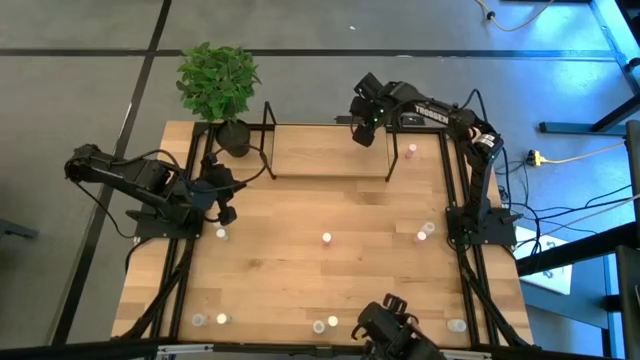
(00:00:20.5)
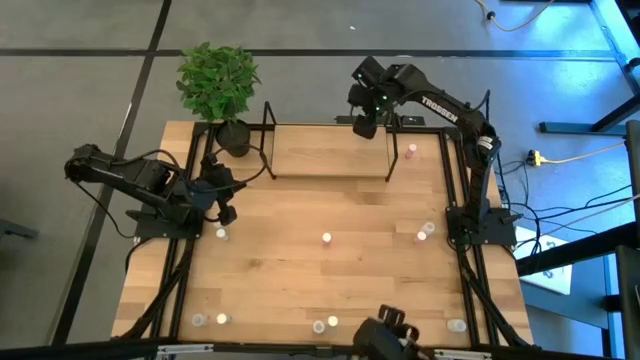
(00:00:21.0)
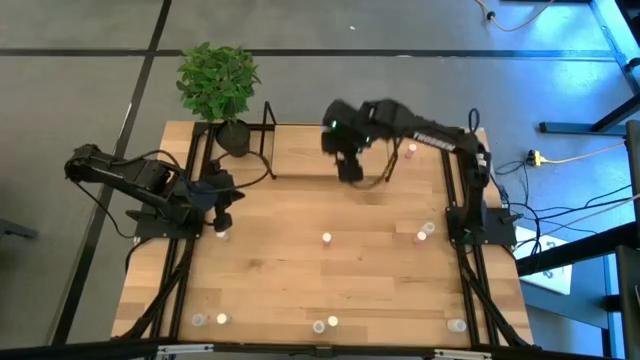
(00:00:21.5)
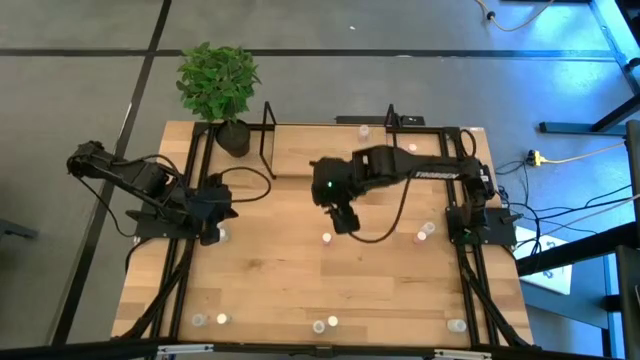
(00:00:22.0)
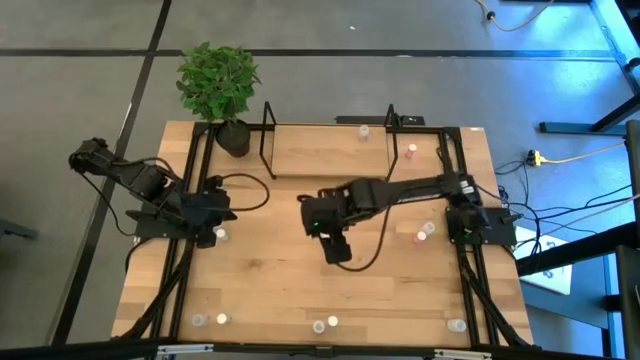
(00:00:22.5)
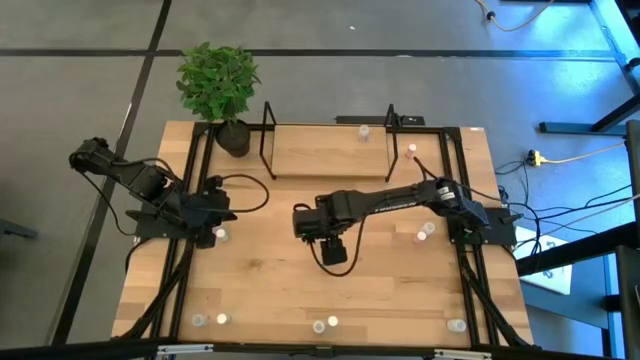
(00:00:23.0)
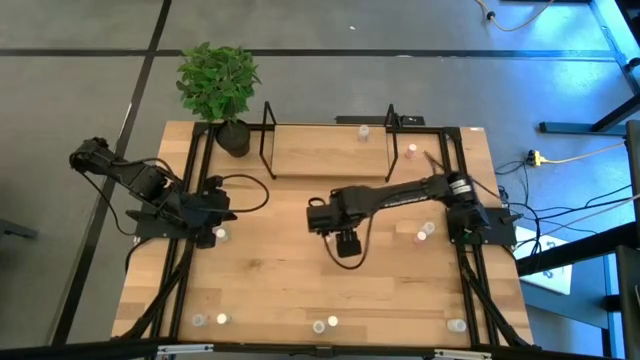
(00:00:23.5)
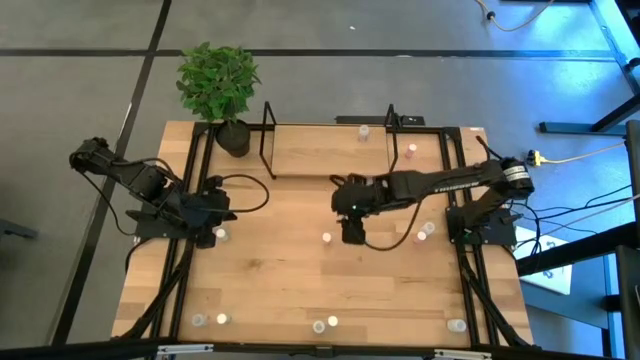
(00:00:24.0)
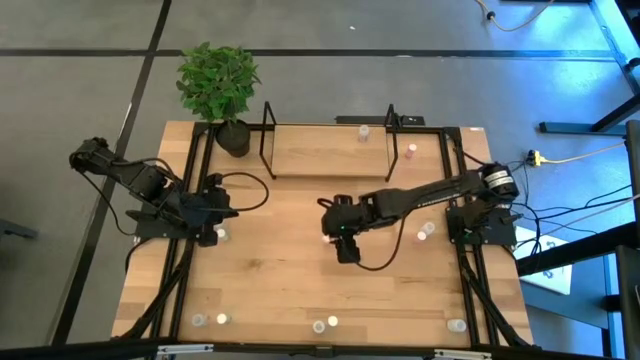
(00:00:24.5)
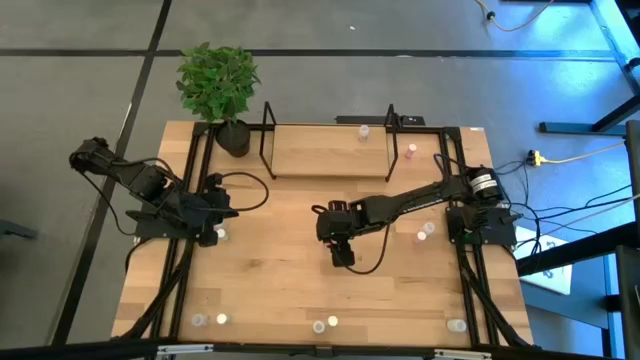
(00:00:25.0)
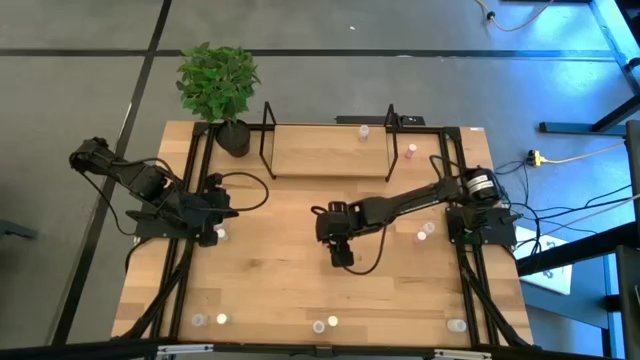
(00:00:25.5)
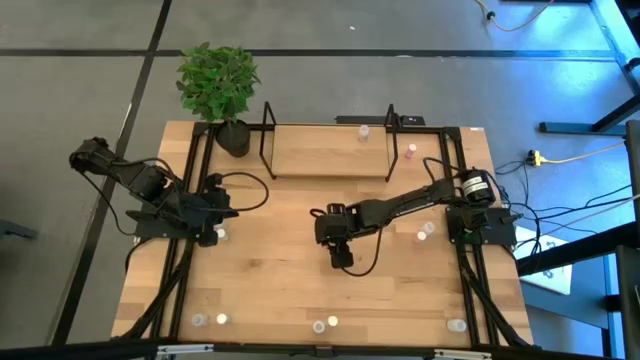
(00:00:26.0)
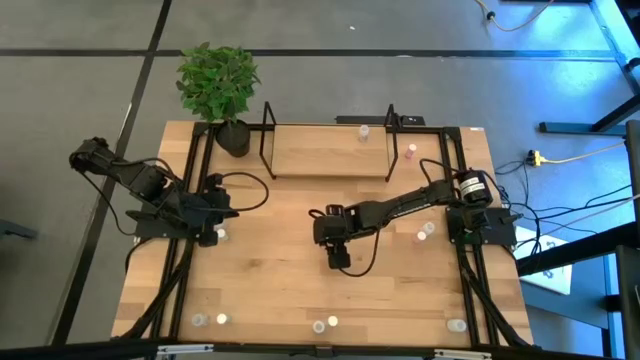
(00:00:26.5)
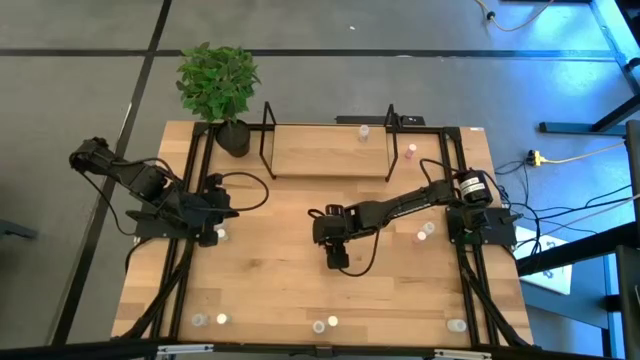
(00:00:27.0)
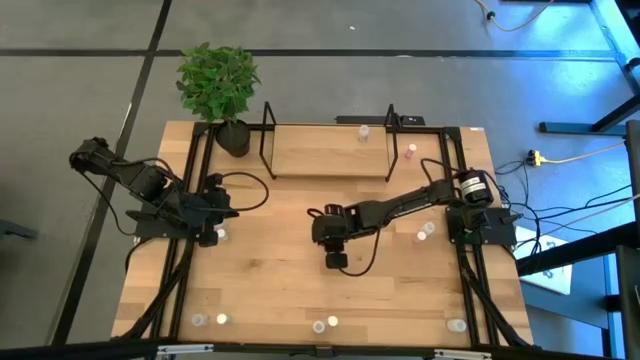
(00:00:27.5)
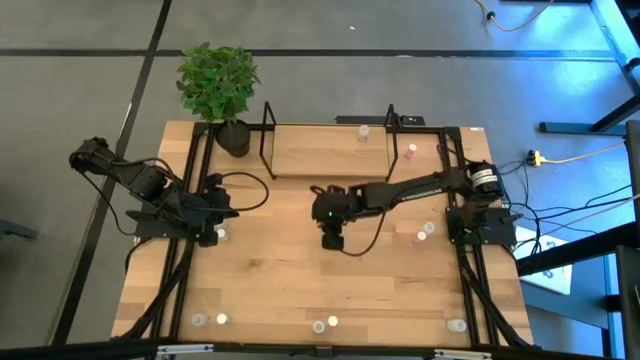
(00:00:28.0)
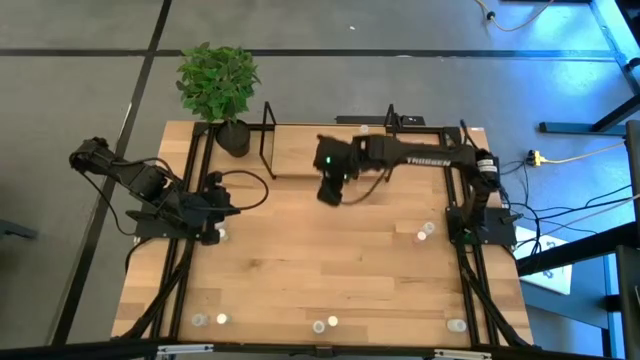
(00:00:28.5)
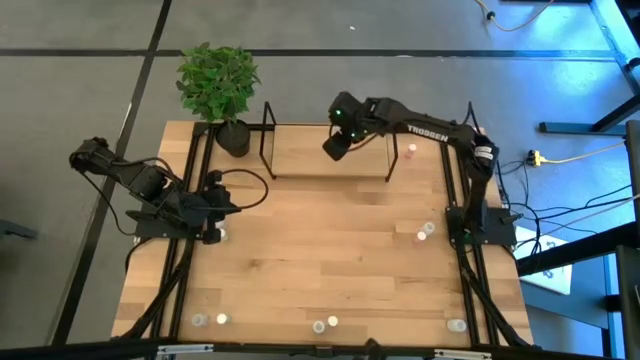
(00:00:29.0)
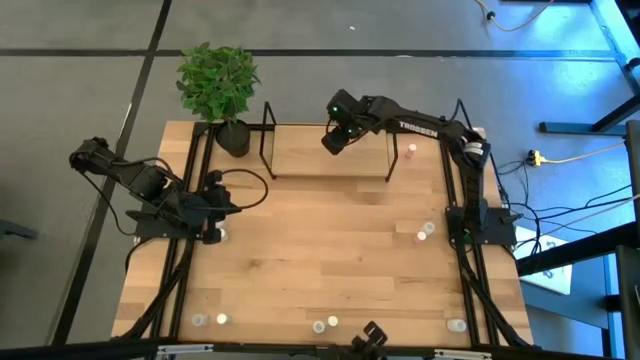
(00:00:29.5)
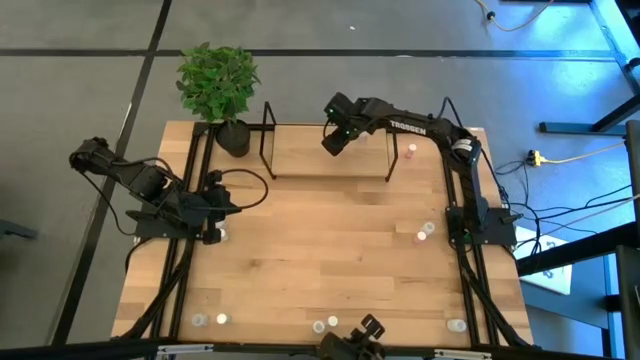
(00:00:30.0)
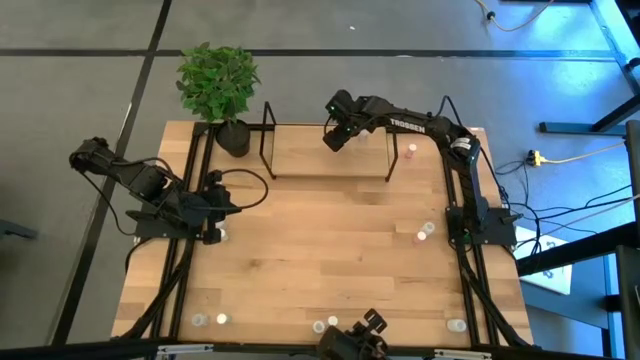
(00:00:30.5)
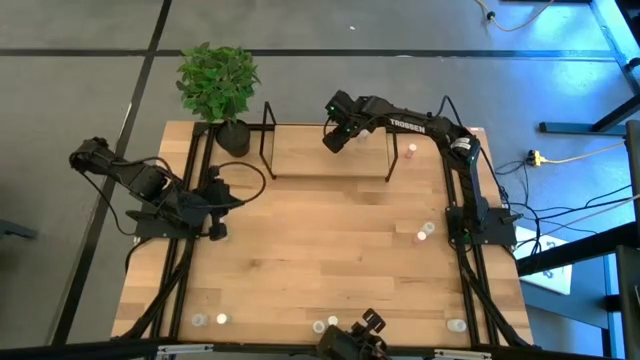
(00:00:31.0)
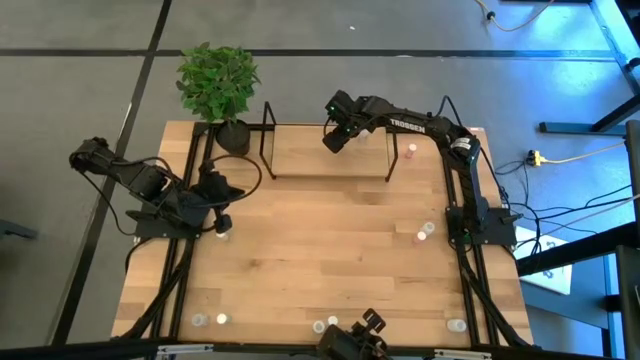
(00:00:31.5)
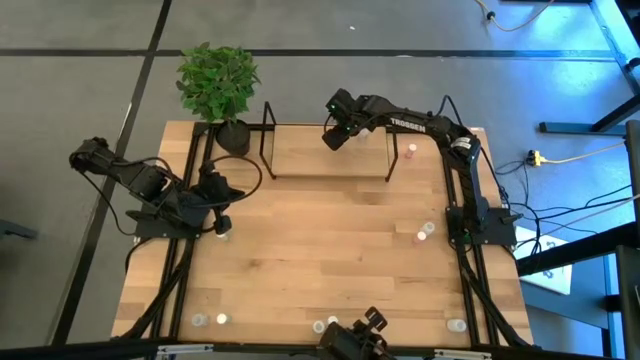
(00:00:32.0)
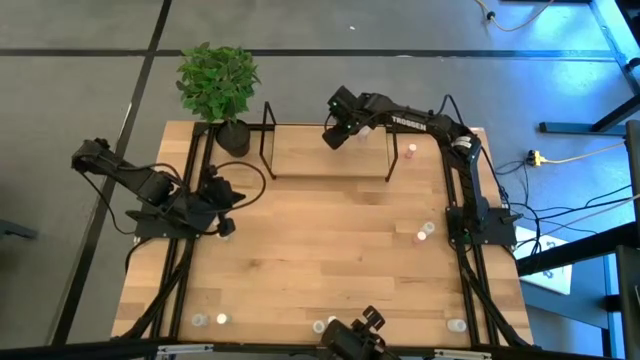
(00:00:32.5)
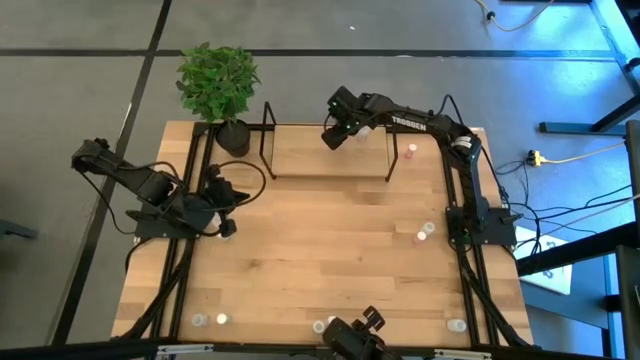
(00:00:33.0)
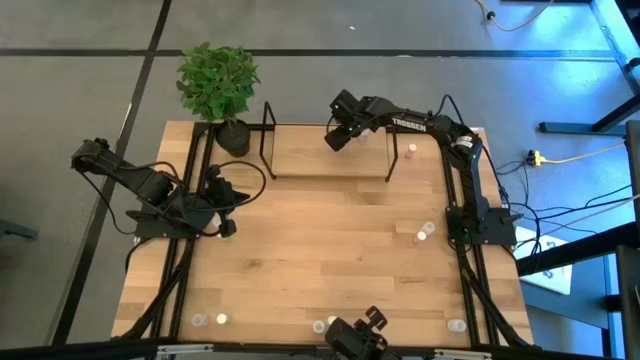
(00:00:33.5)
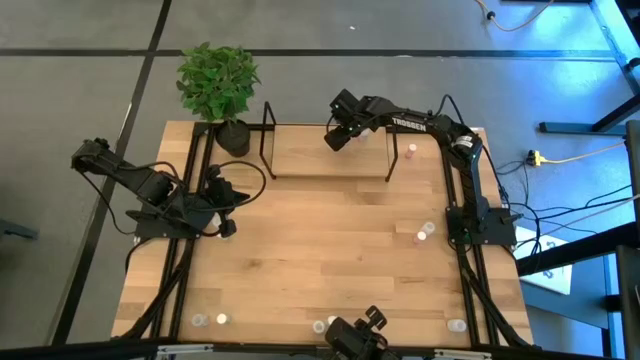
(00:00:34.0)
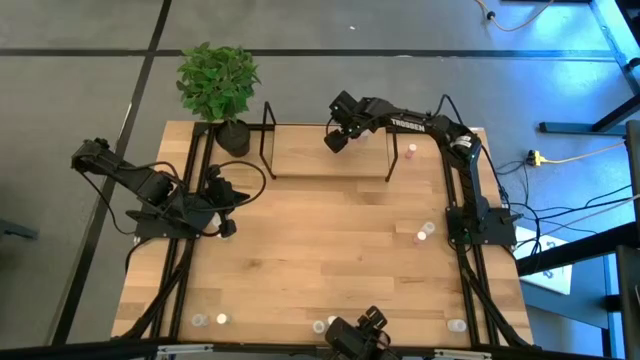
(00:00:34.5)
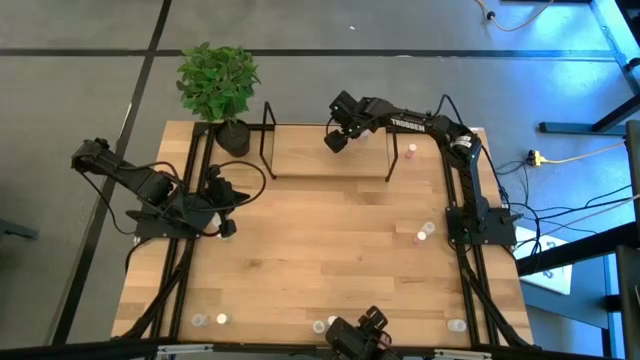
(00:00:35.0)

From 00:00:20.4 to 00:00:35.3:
Task: Pick and place medicine bottles onto shelf by color
Put the bottom left pink medicine bottle on the shelf

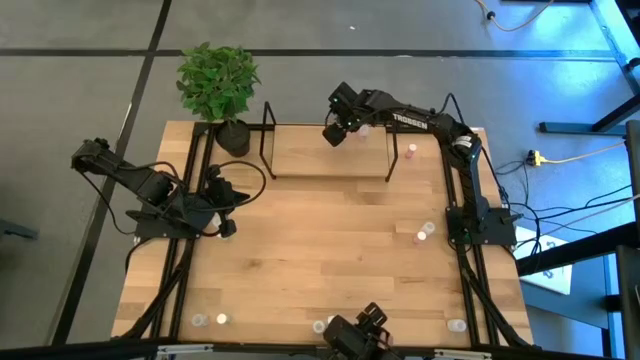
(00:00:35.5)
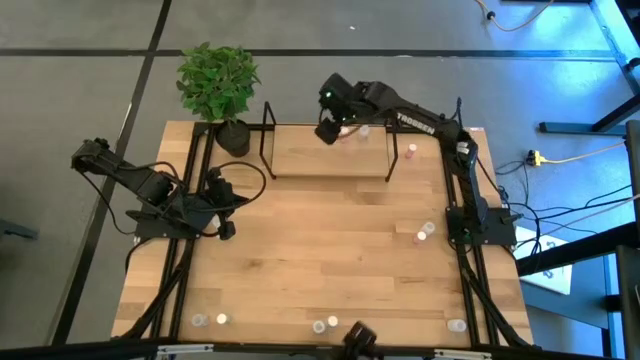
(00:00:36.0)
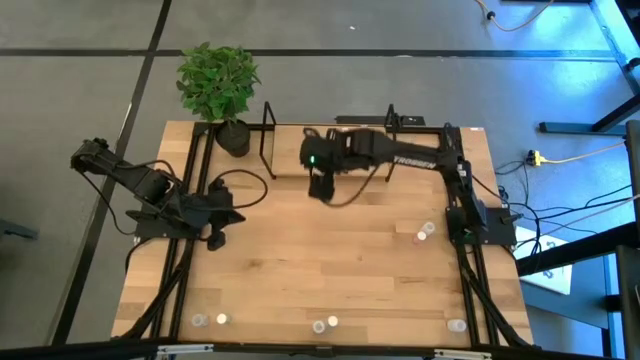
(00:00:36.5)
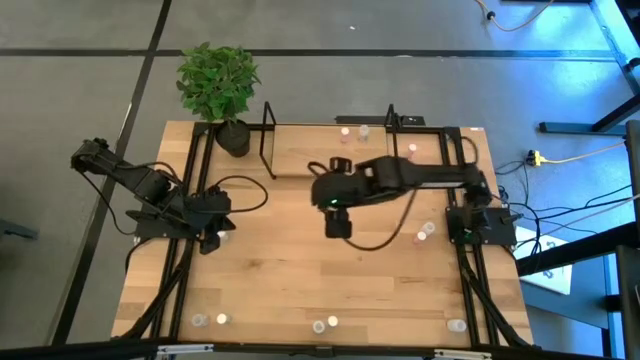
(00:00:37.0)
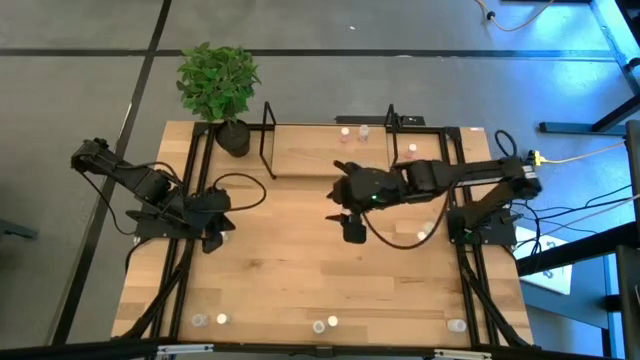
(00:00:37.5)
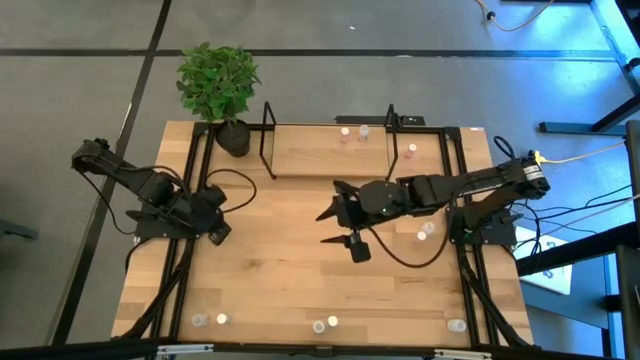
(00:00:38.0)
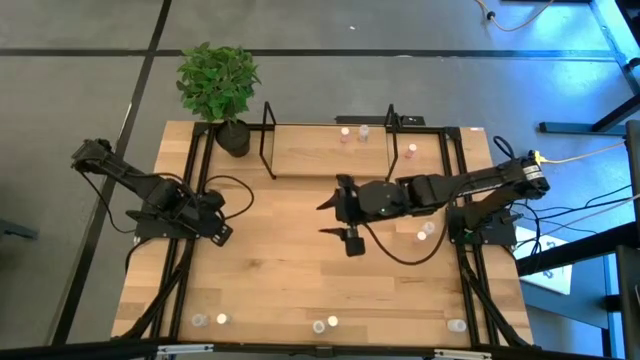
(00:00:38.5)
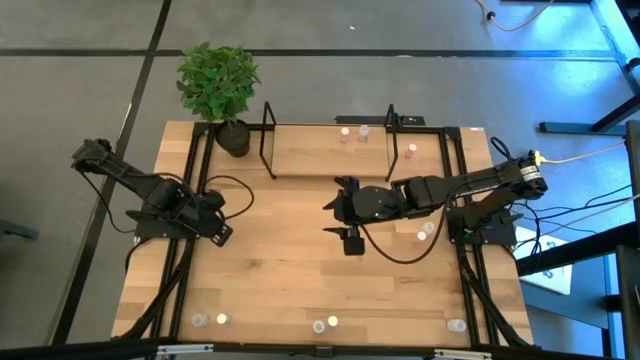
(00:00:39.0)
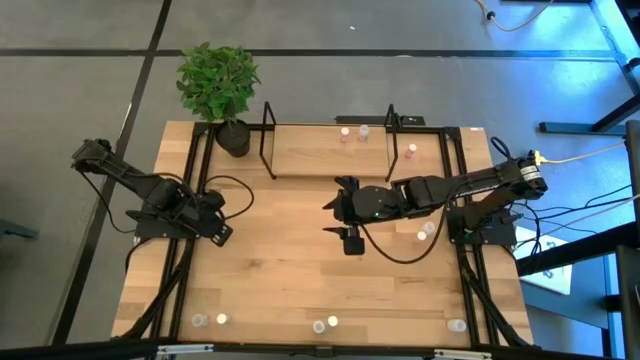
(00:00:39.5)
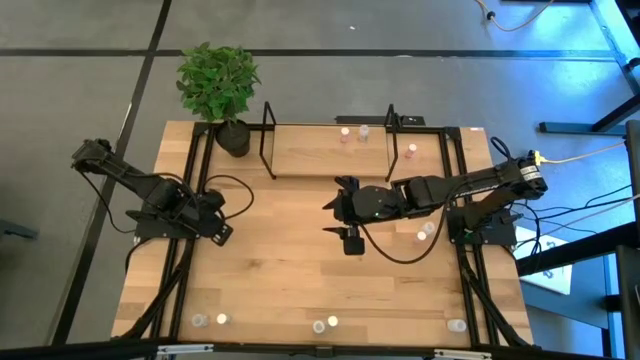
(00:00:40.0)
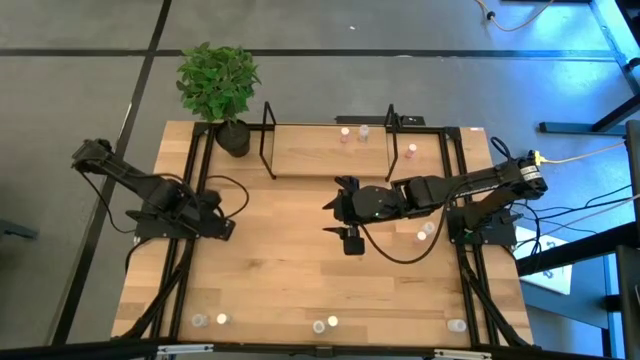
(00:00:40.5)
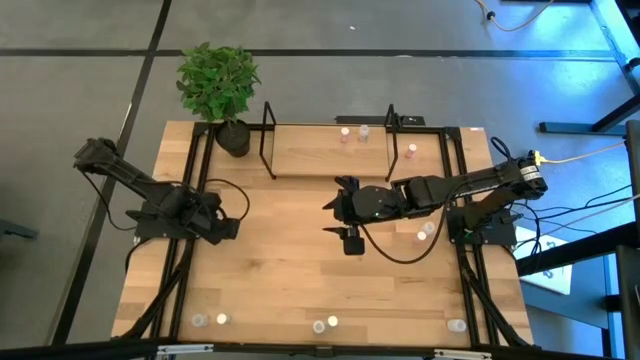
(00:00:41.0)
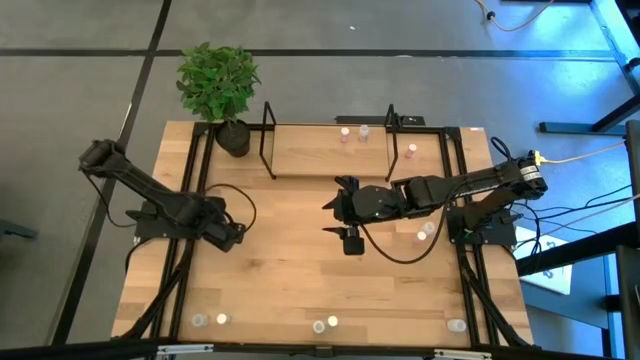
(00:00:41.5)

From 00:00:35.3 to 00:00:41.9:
Put the top blue medicine bottle on the shelf
